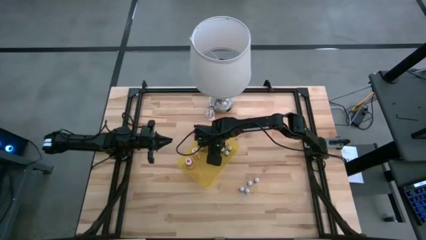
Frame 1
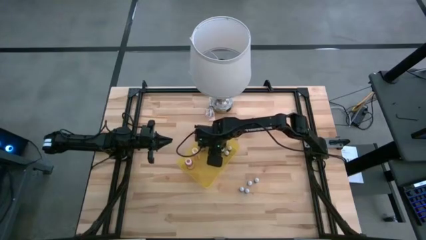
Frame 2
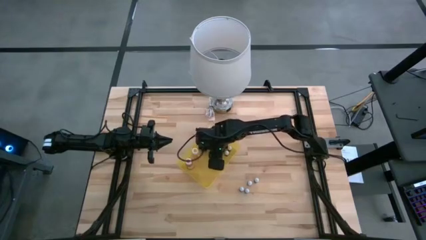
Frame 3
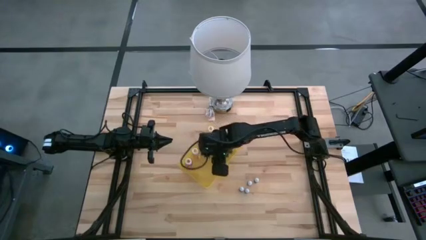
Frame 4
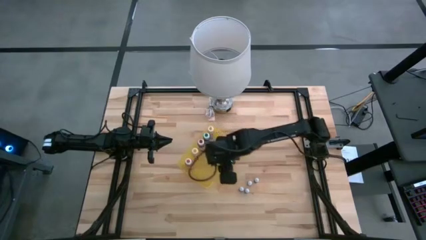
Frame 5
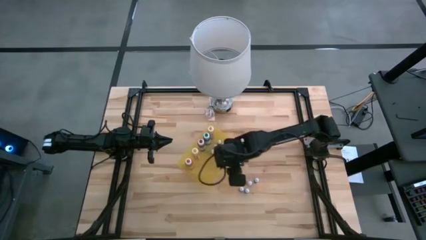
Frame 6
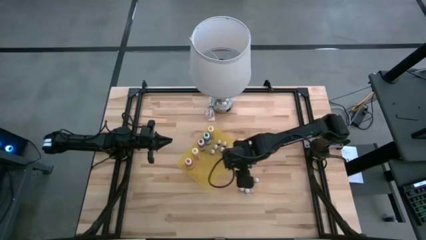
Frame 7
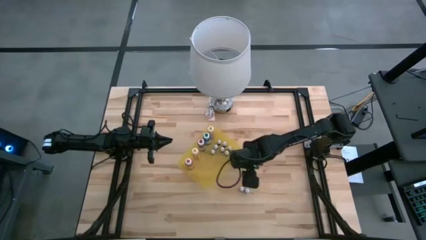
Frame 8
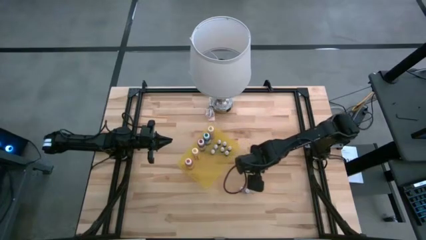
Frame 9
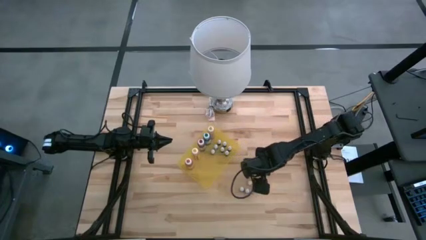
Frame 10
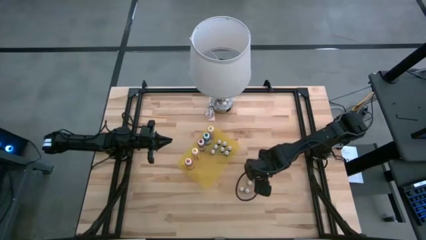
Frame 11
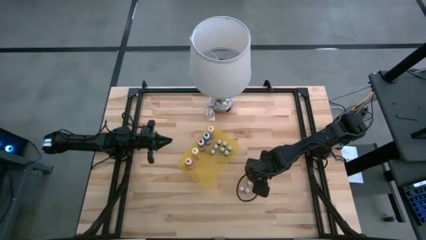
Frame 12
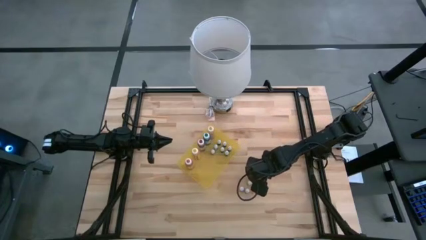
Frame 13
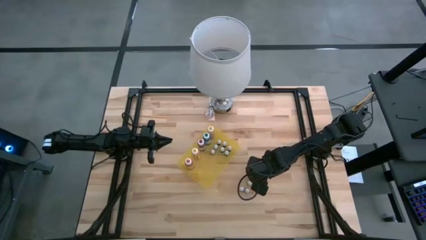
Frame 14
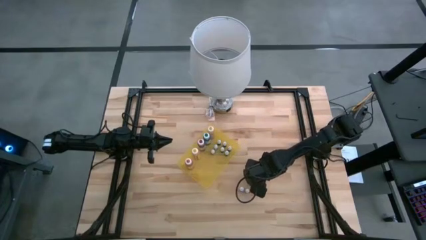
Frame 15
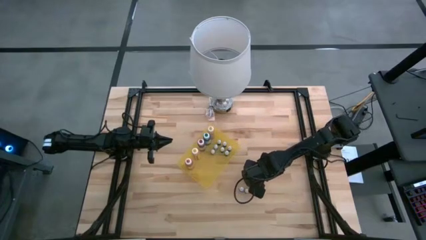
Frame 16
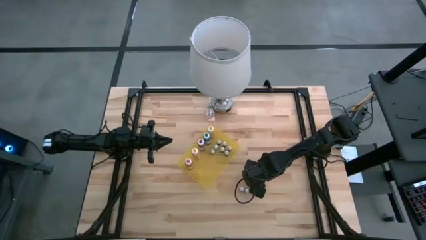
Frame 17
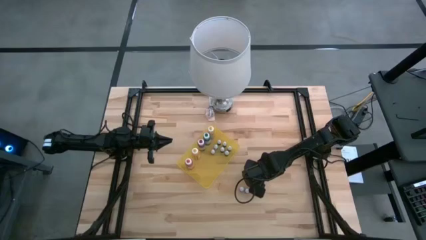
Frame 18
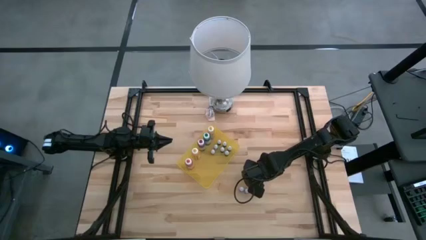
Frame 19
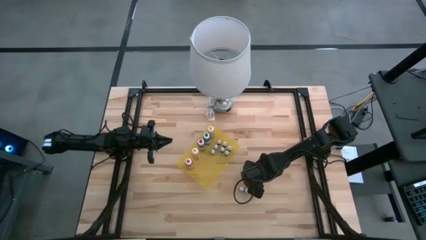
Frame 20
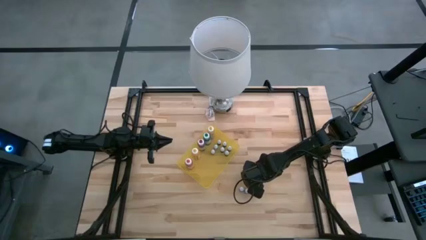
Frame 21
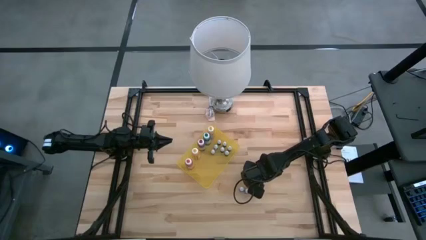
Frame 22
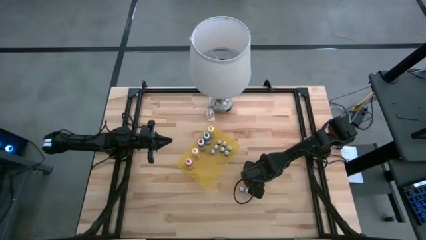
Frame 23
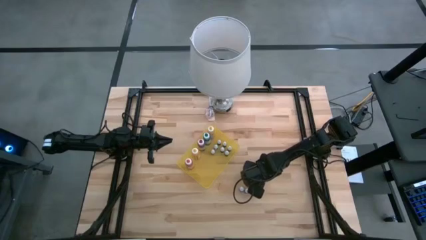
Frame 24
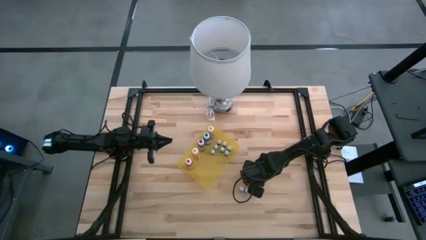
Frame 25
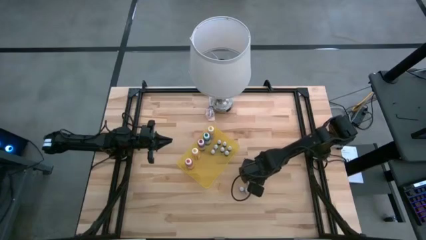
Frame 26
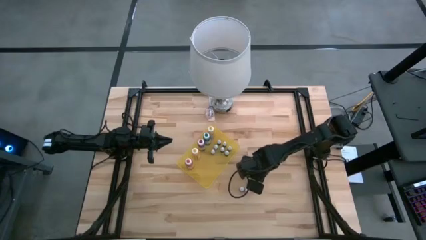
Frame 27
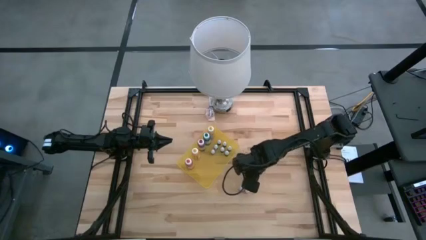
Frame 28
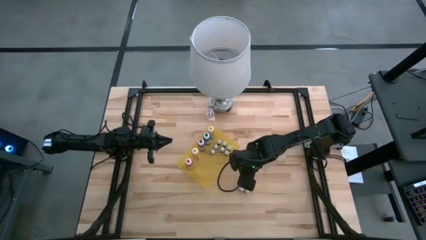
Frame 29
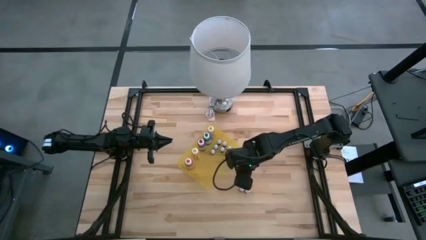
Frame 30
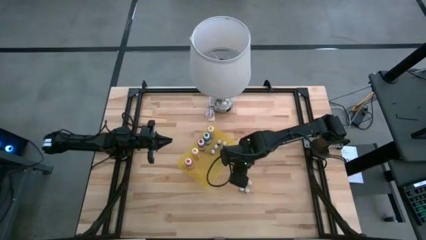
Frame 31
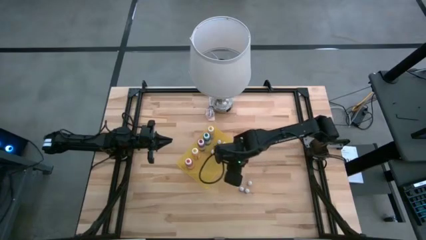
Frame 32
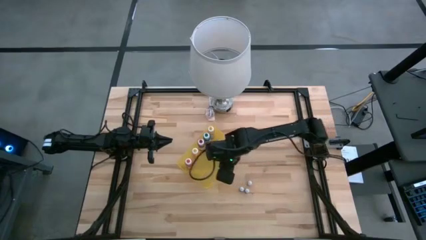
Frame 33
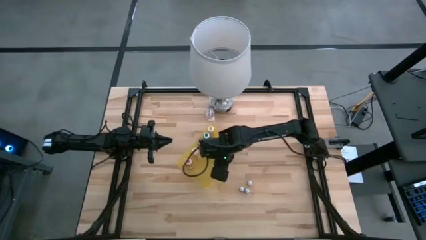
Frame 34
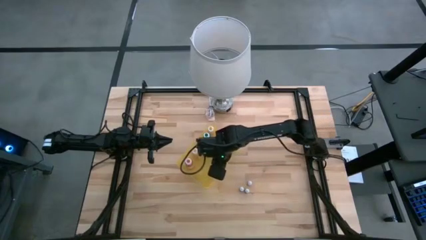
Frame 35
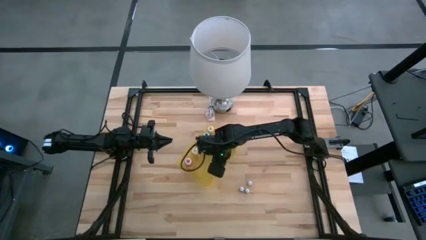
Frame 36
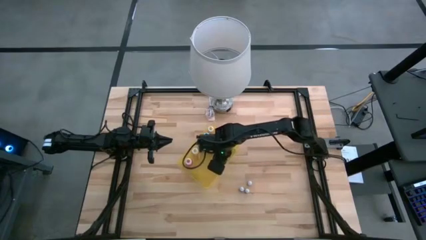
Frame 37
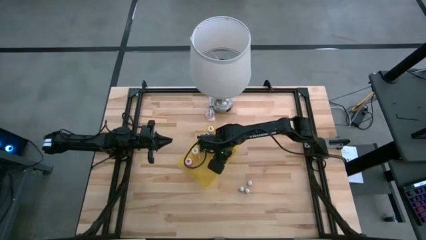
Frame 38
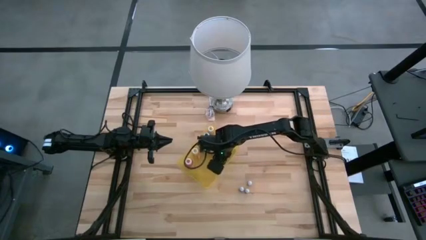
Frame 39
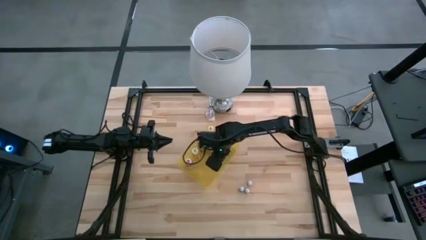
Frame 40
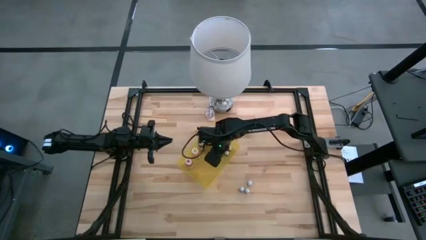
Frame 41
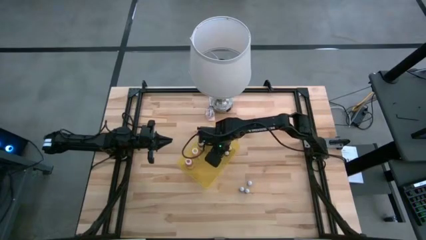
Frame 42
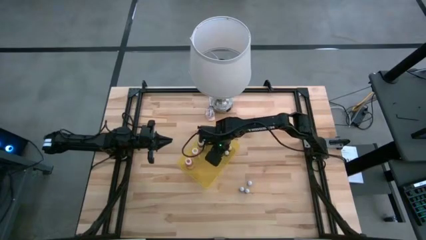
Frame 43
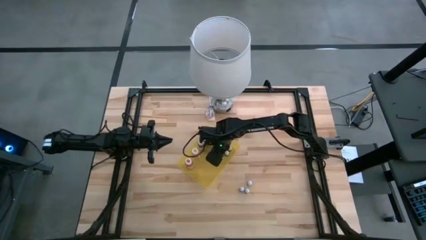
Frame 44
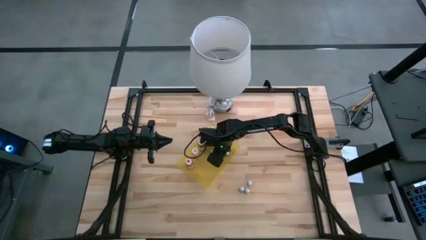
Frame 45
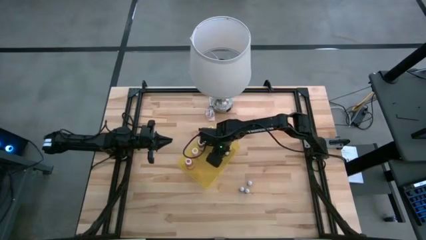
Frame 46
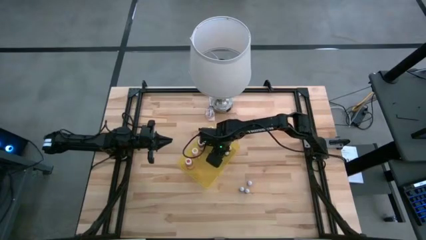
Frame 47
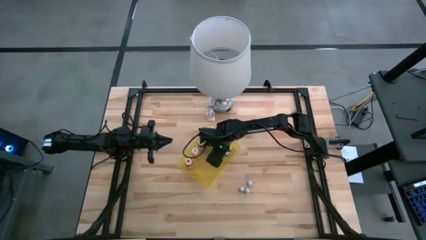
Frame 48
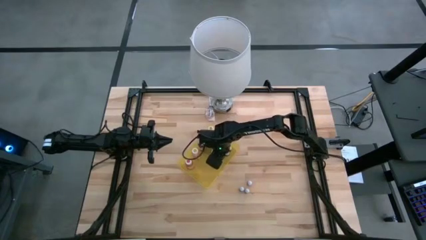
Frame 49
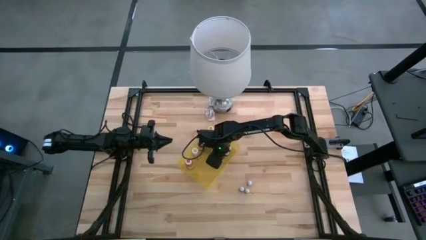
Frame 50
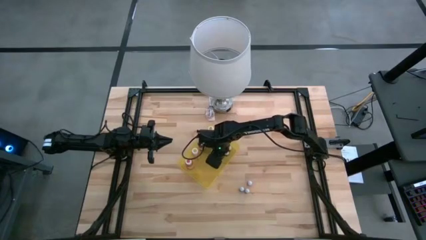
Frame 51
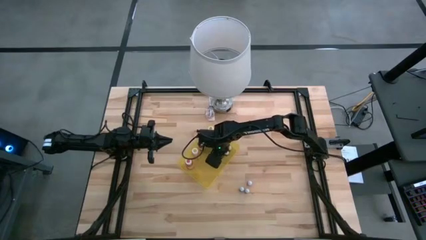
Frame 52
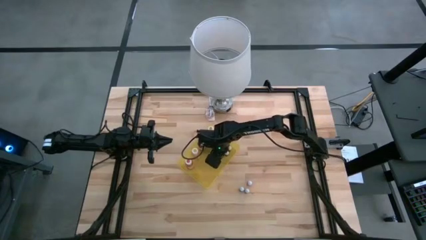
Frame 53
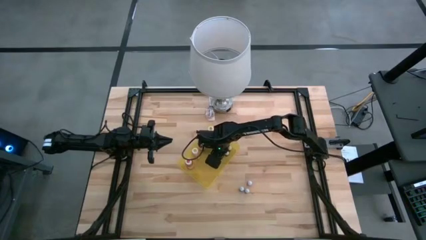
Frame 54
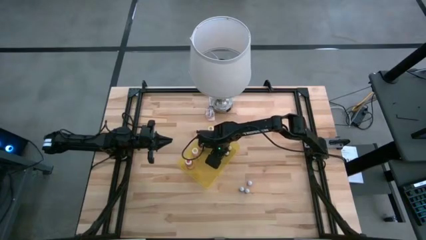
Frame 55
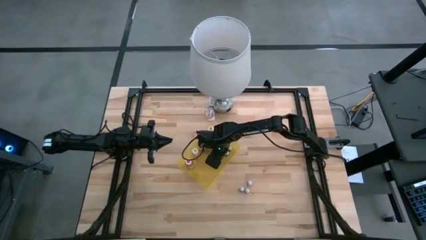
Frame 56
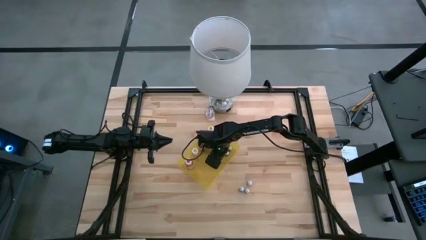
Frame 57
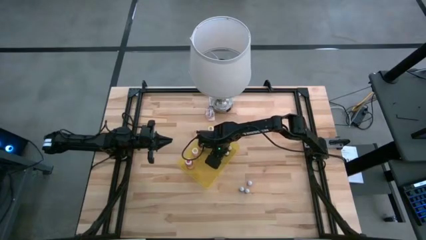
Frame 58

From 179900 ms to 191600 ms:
Task: Pick & Place food coloring
Put the small blue food coloring bottle into the yellow bin

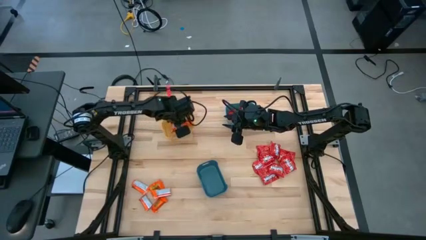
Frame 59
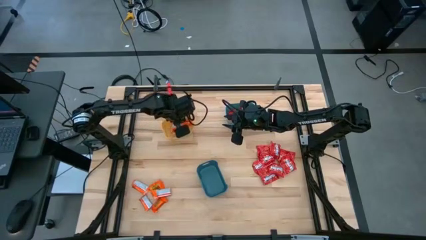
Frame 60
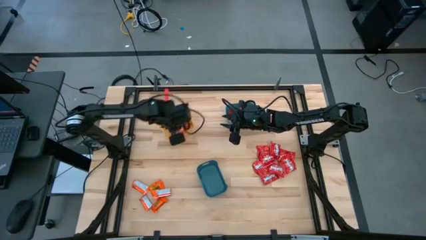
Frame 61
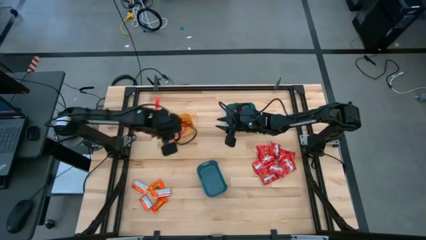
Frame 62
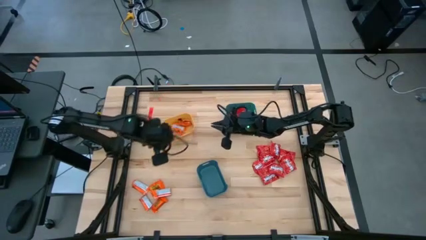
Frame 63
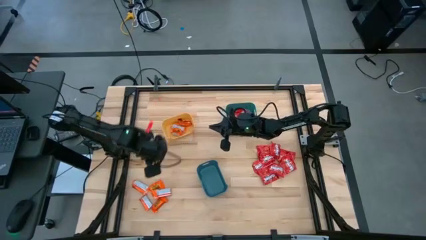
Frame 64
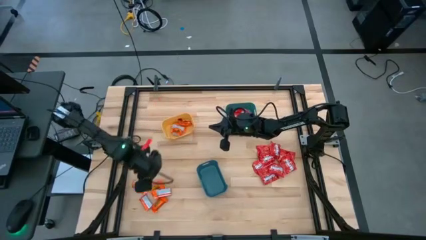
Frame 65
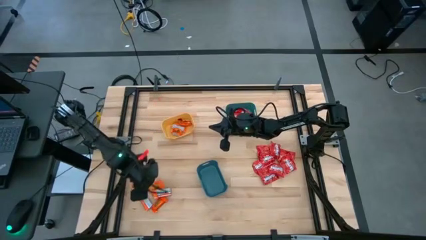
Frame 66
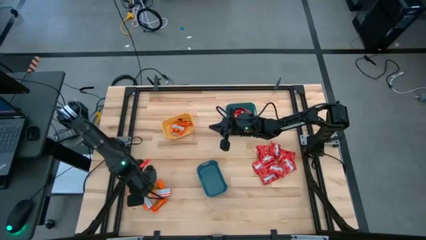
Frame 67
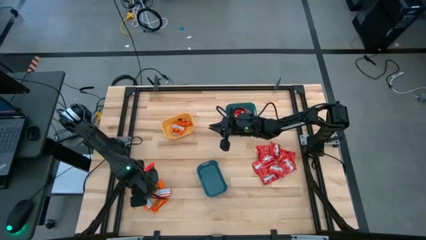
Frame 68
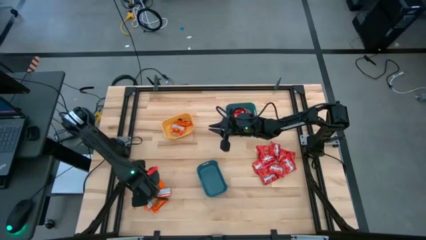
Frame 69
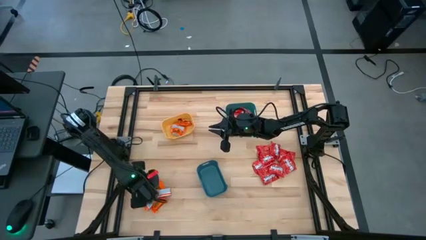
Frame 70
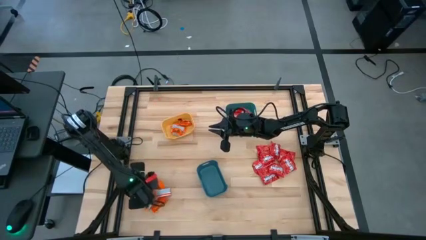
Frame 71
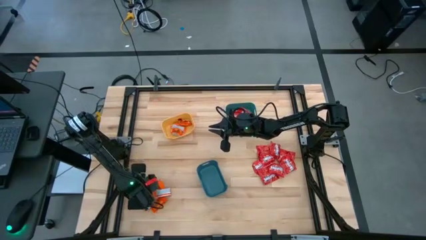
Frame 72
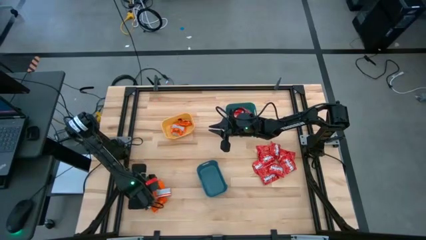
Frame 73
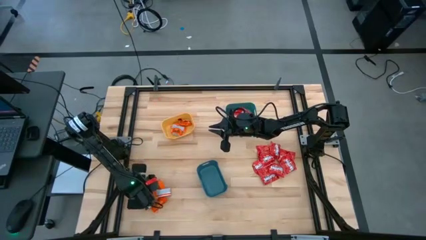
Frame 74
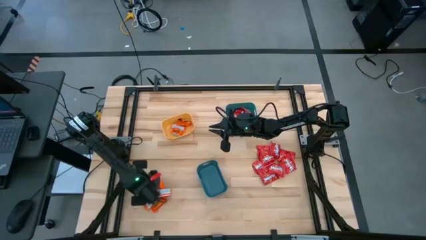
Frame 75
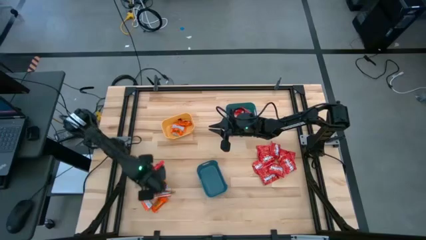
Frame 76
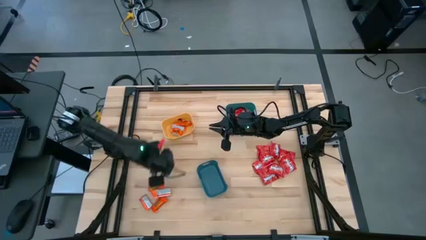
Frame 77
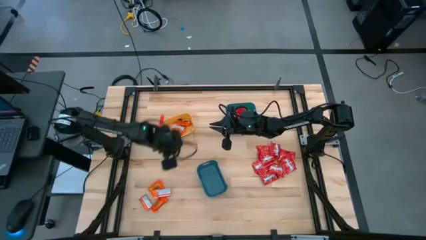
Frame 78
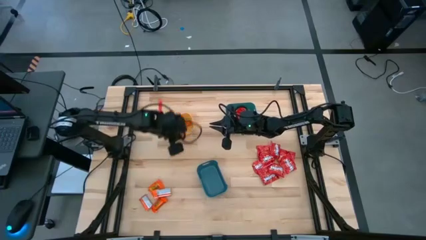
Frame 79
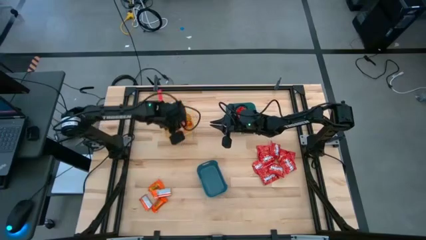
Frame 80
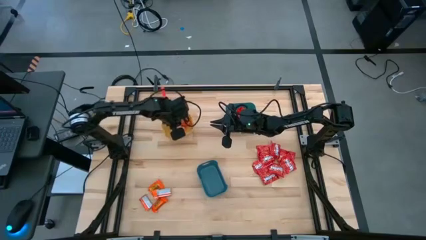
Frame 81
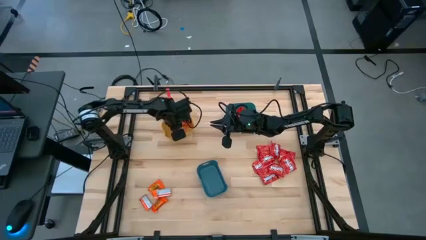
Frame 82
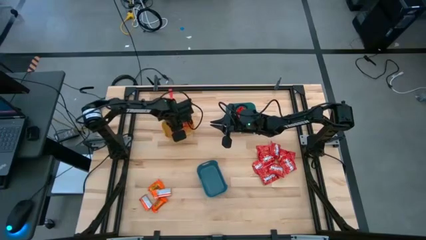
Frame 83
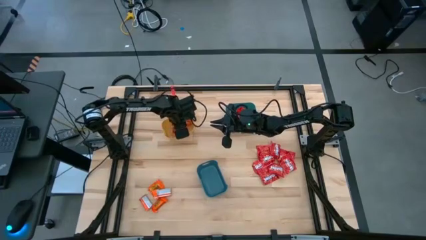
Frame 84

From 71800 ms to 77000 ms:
Task: Sort candy
Put the orange chocolate bar into the yellow bin
